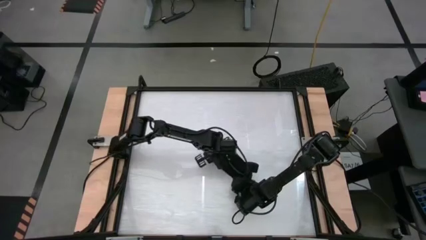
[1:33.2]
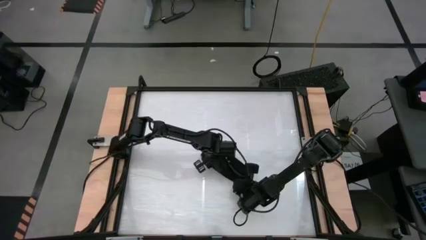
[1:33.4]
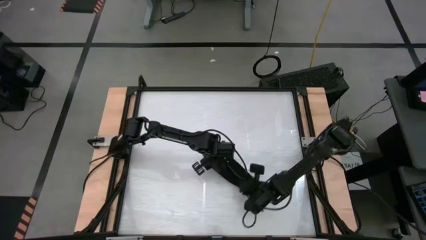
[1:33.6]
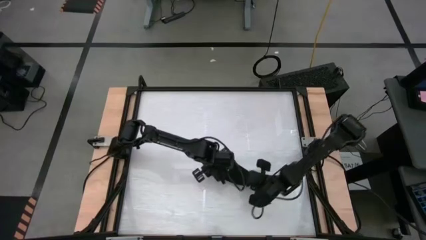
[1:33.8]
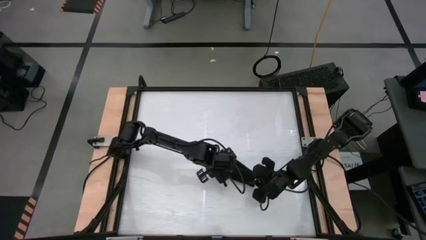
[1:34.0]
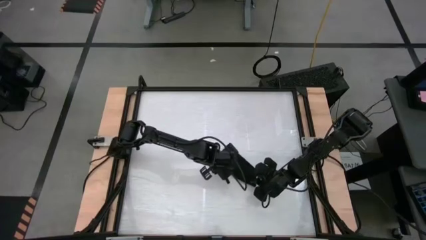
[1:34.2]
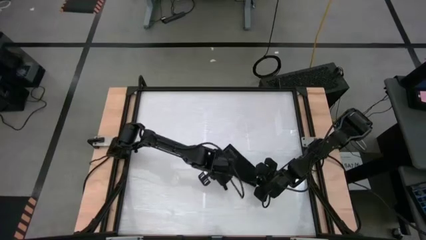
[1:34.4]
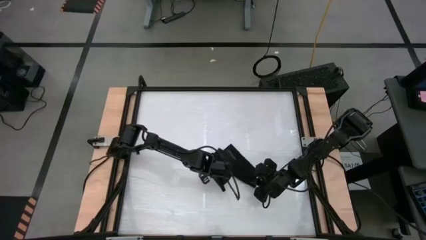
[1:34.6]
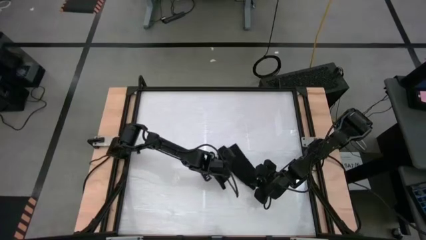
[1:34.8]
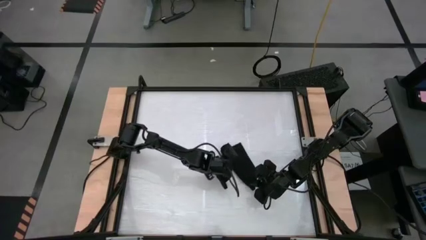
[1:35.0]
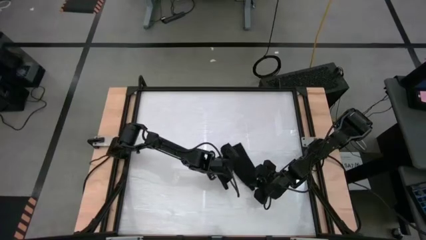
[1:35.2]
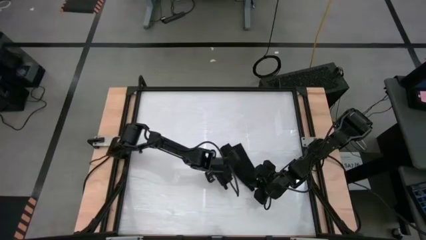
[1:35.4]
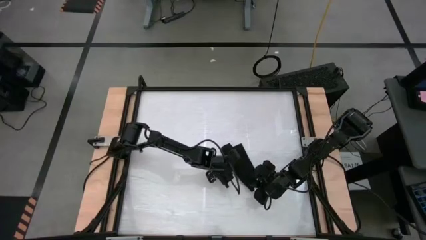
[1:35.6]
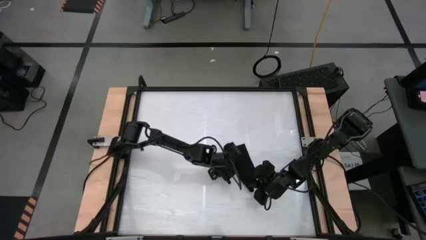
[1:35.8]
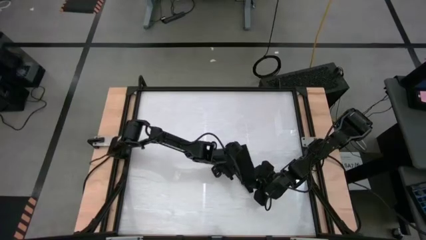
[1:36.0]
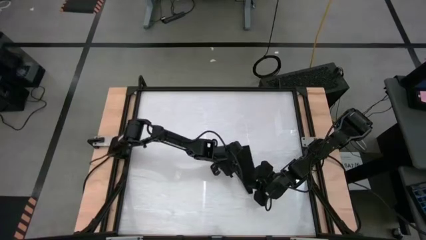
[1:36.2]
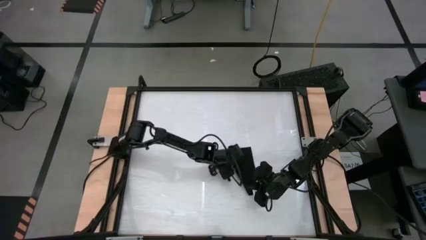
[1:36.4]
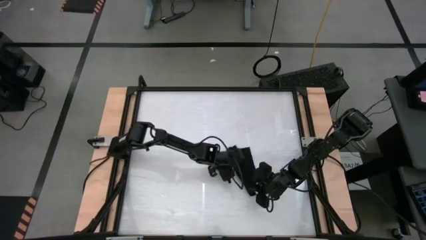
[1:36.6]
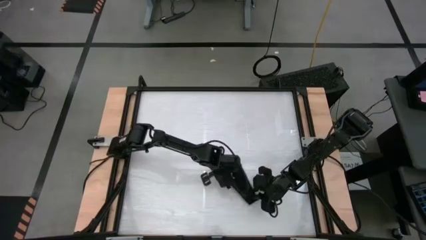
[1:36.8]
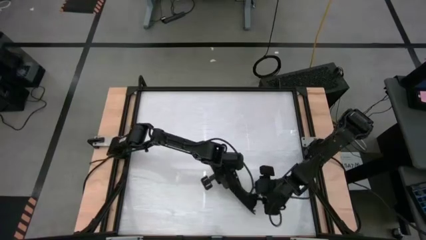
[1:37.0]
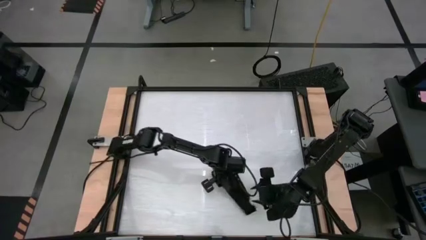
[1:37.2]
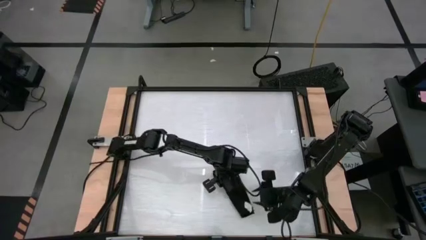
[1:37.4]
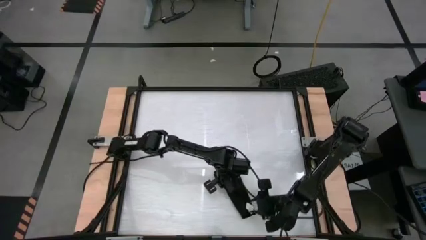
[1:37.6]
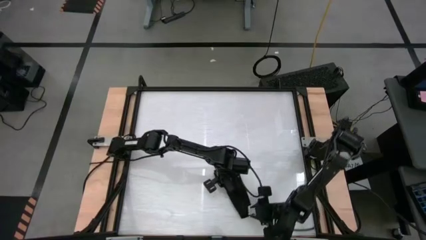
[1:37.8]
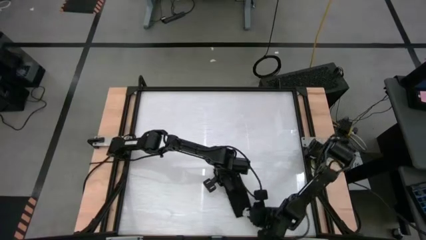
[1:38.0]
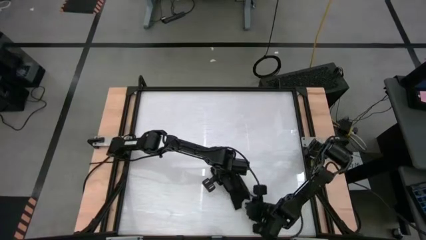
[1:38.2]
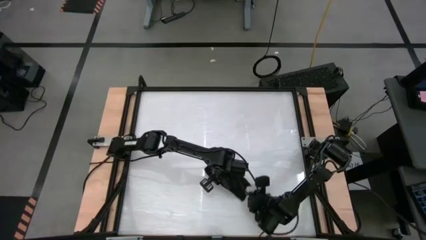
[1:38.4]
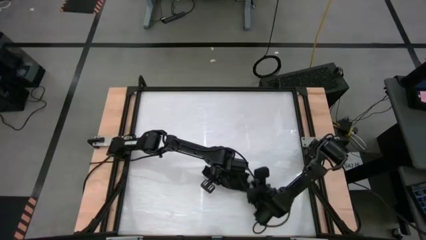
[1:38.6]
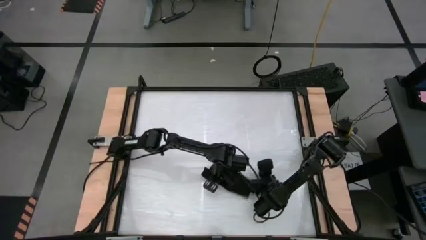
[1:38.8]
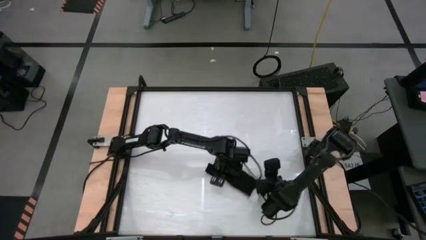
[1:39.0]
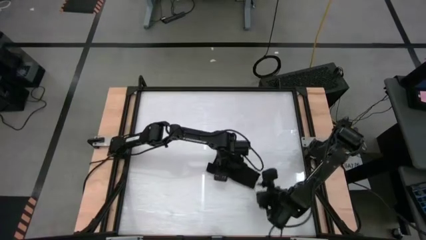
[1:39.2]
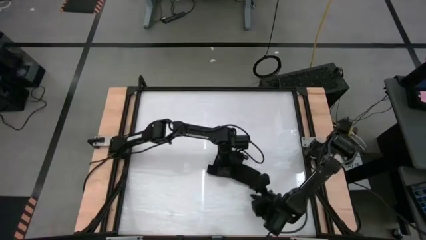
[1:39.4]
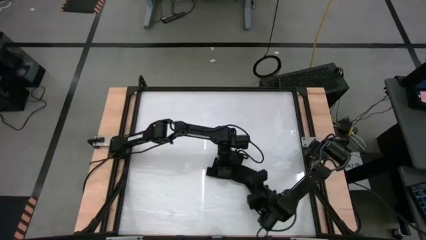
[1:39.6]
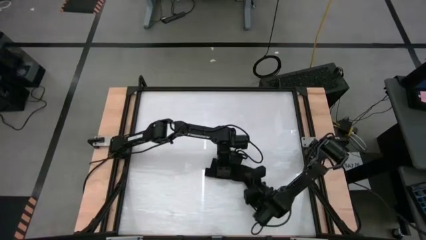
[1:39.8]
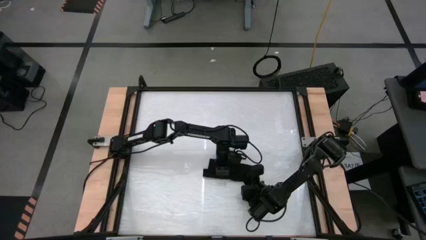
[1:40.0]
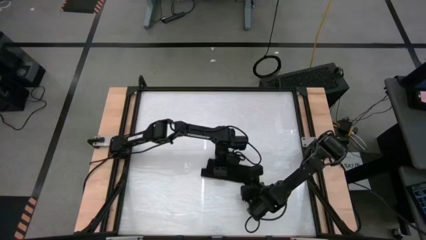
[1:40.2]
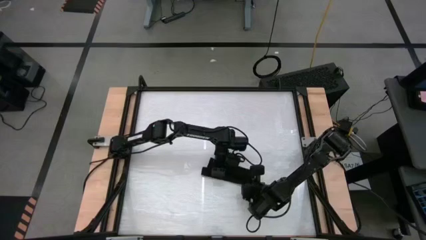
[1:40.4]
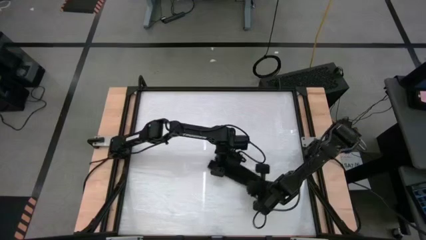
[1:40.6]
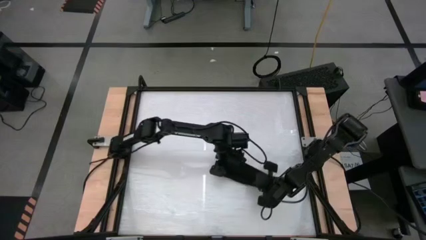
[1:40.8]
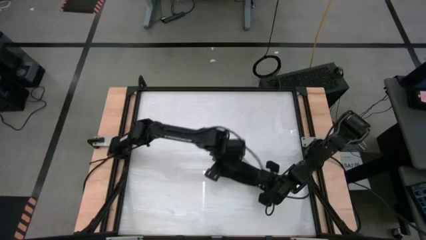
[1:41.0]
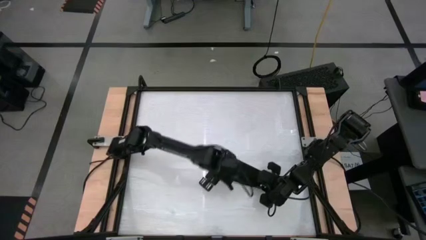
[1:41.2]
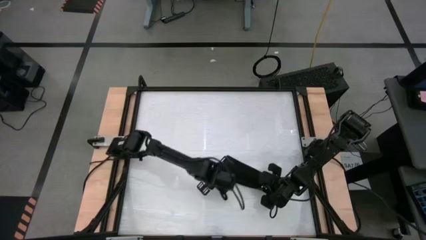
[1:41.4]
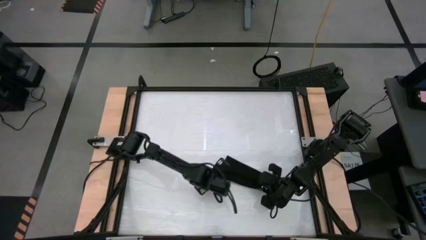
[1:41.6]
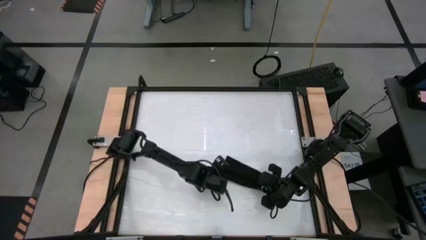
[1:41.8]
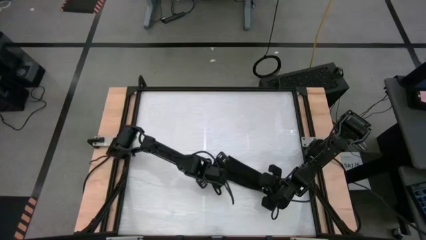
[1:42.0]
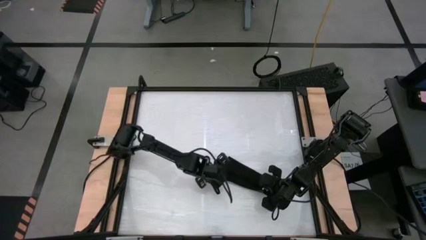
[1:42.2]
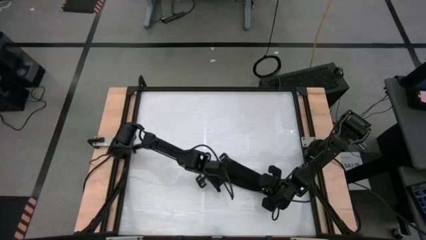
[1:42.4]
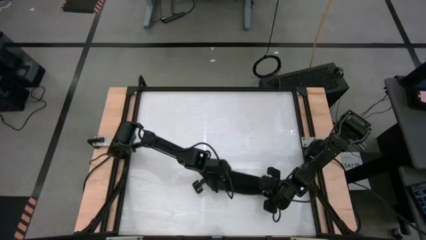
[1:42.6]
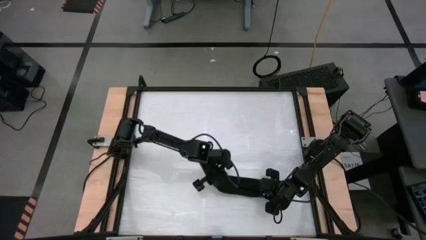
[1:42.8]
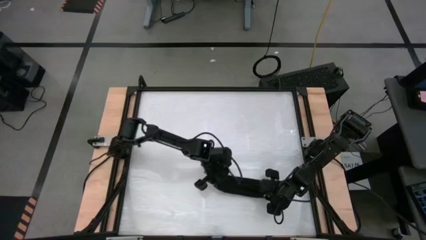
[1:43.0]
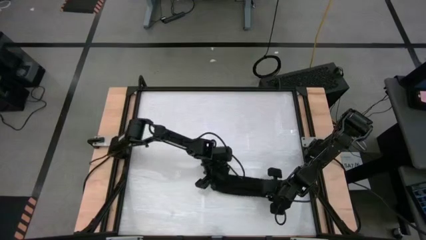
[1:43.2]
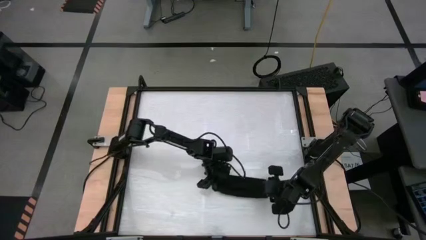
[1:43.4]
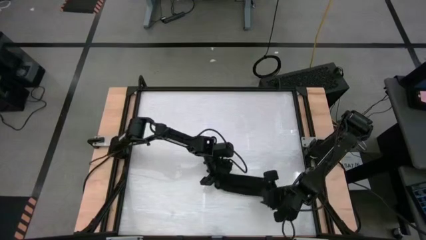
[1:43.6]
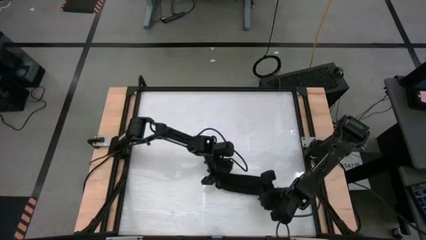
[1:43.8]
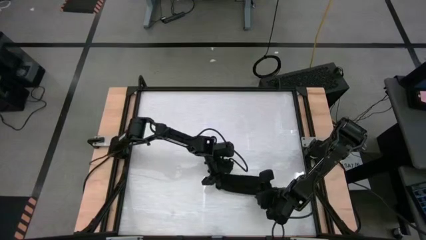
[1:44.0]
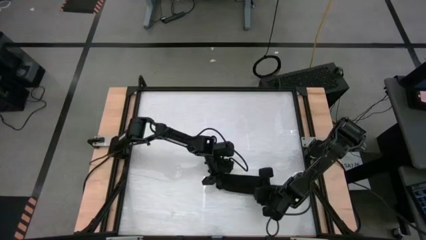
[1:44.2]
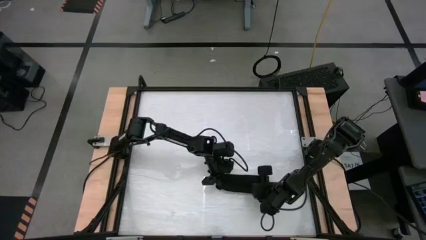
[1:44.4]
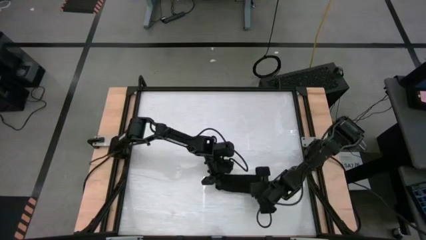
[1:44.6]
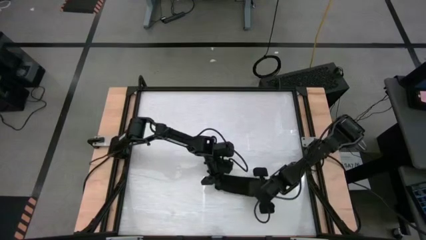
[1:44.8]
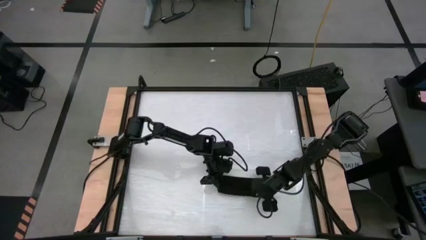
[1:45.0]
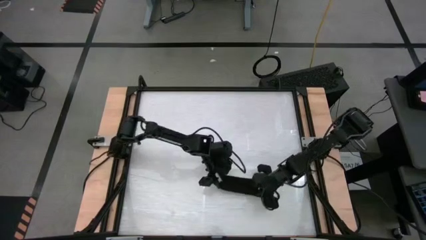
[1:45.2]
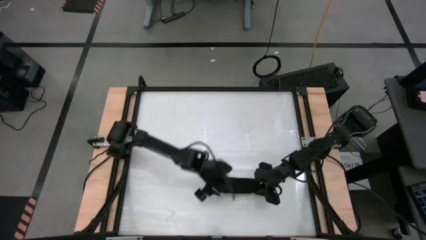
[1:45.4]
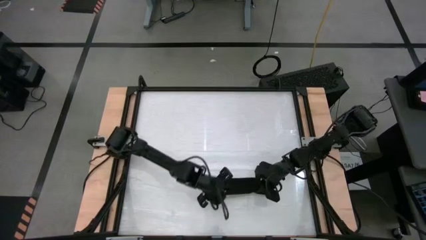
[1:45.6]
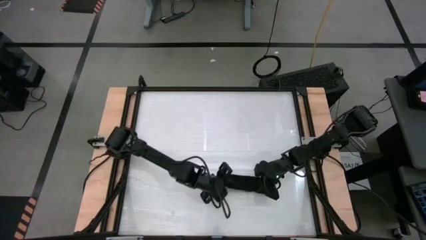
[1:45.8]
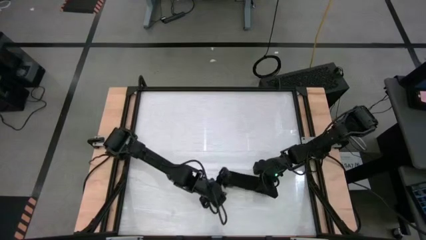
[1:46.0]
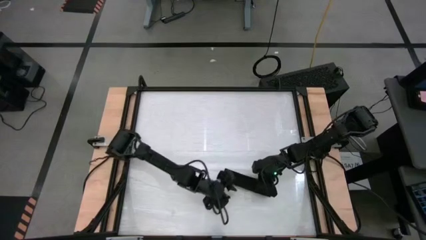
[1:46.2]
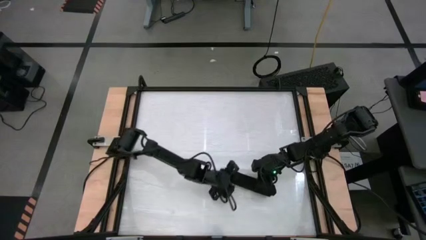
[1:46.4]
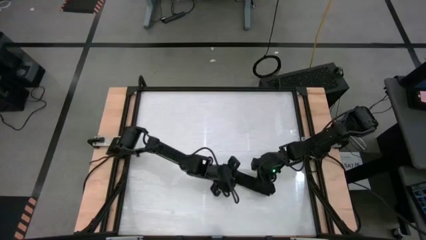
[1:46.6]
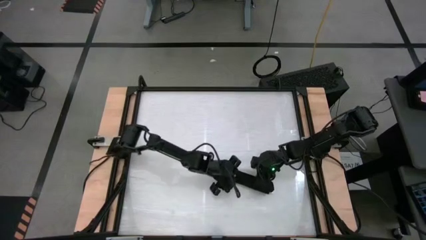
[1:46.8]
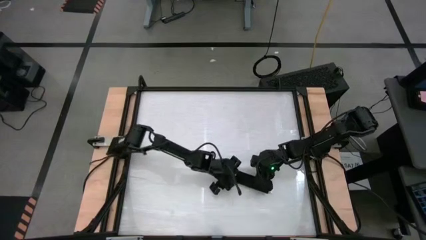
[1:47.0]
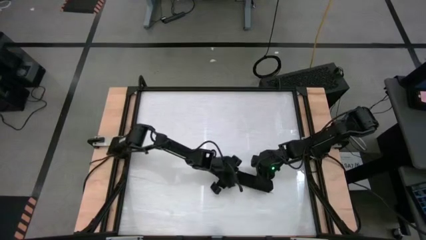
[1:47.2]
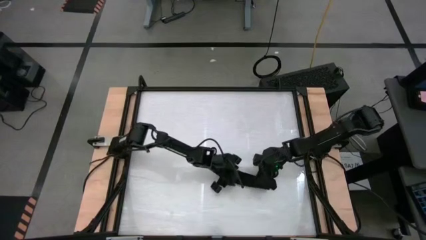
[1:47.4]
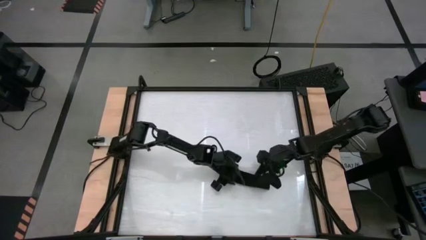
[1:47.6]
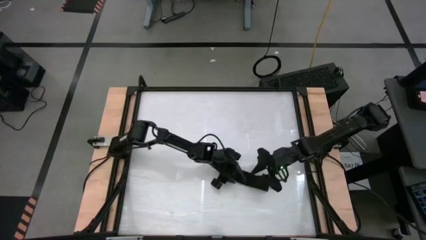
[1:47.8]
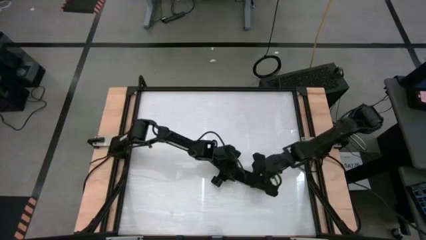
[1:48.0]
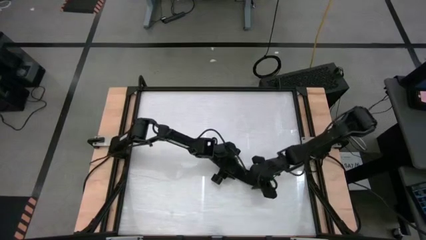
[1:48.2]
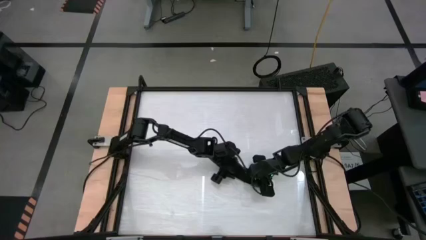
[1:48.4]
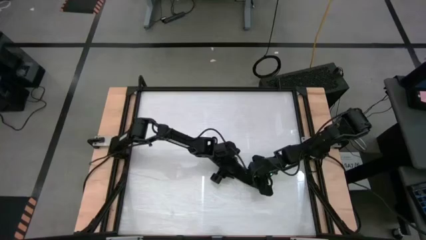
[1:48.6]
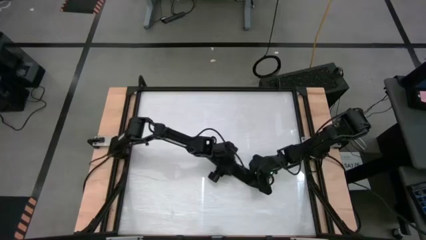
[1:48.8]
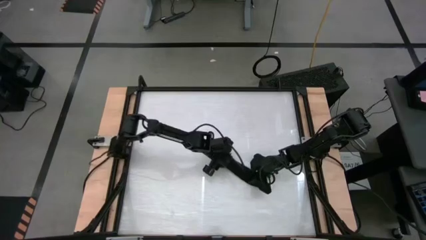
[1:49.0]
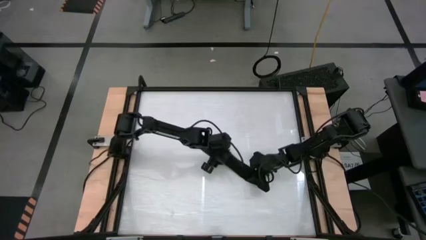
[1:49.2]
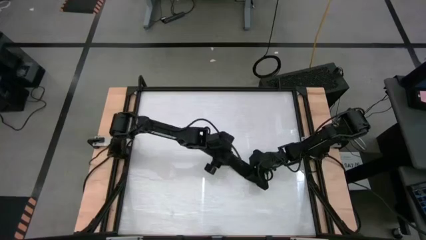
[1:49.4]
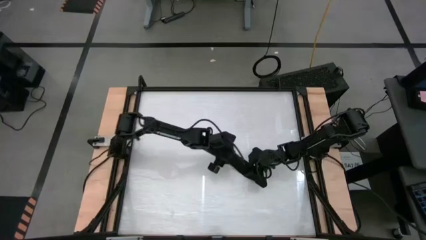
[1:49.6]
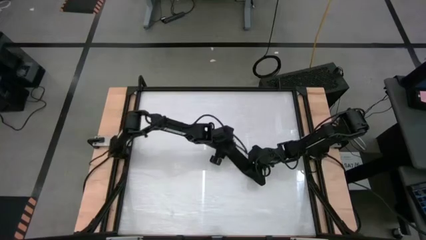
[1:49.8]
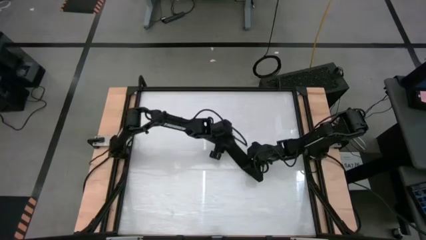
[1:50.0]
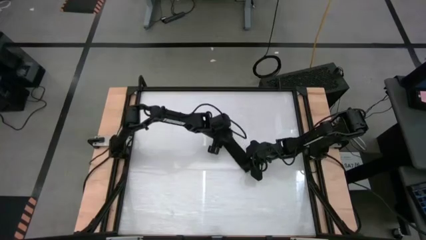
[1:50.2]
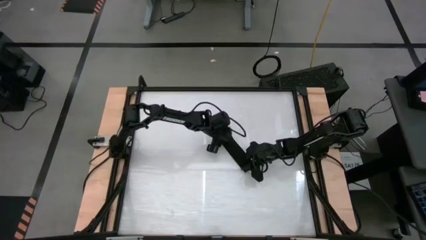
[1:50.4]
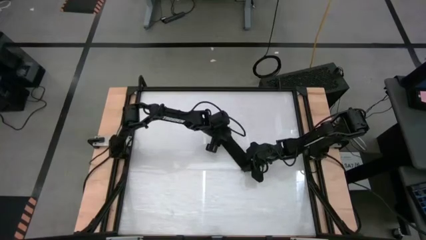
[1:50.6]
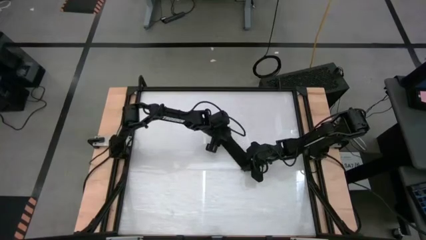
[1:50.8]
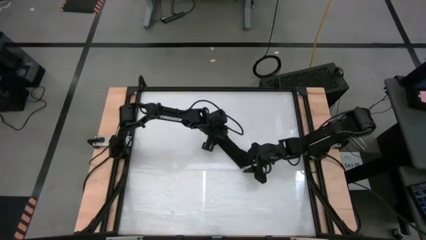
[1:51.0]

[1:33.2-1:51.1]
Task: Roll towel
Roll the black towel
